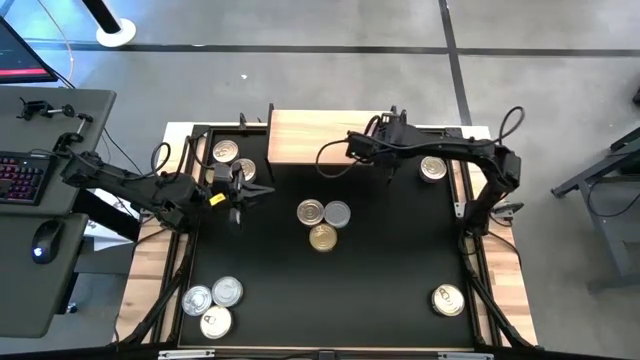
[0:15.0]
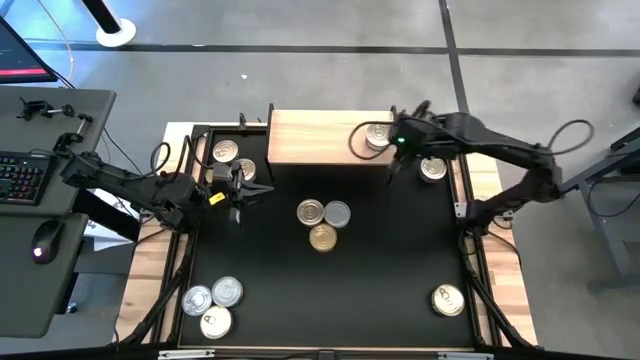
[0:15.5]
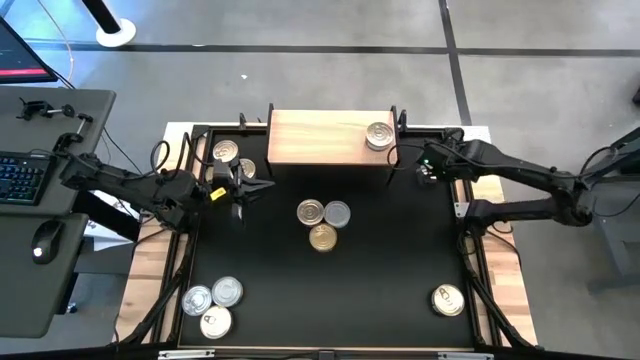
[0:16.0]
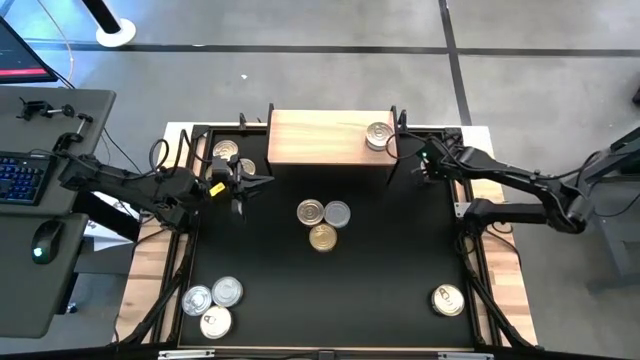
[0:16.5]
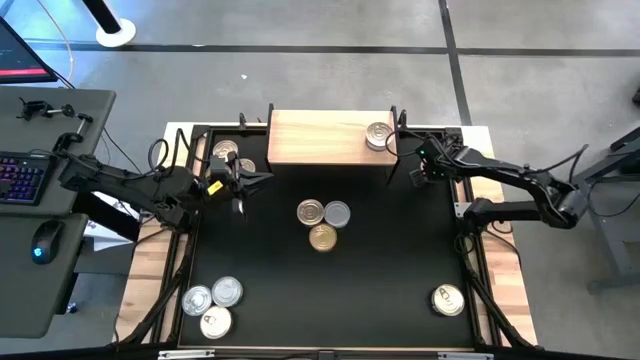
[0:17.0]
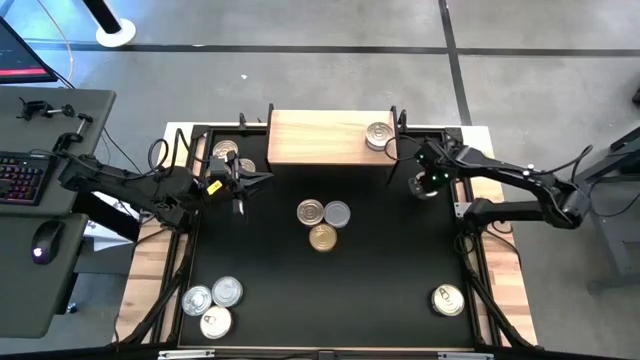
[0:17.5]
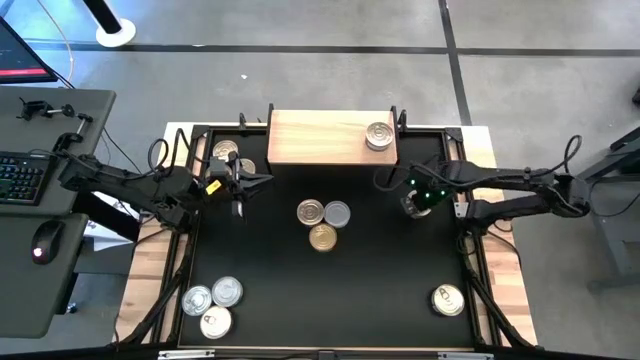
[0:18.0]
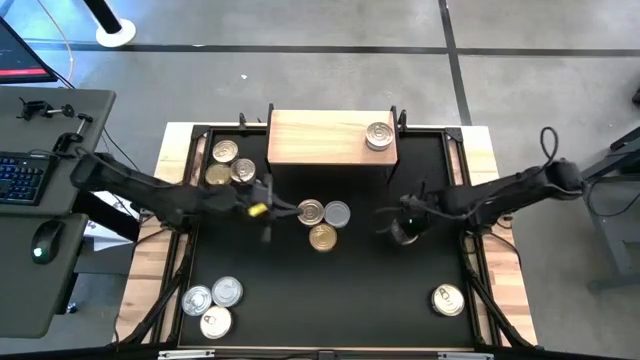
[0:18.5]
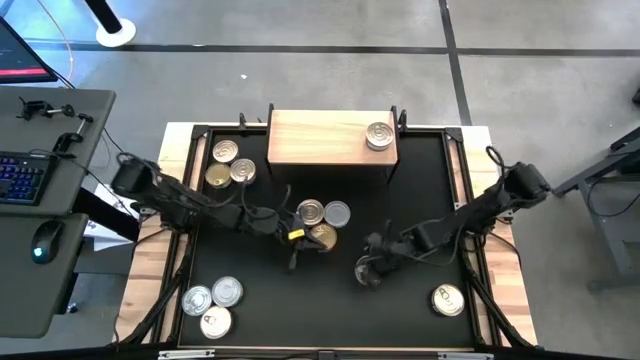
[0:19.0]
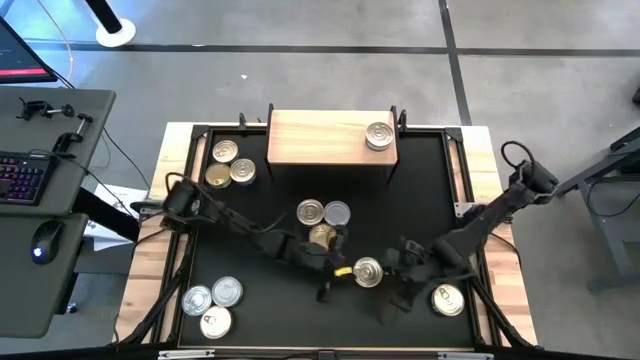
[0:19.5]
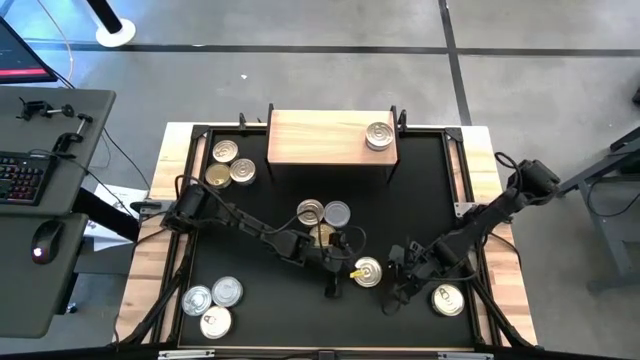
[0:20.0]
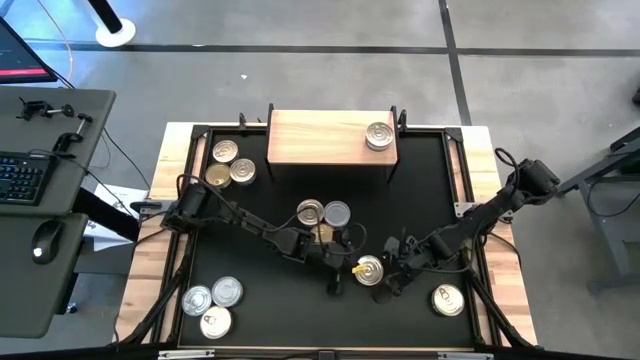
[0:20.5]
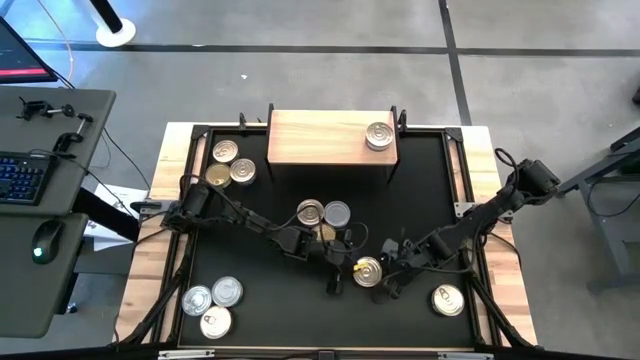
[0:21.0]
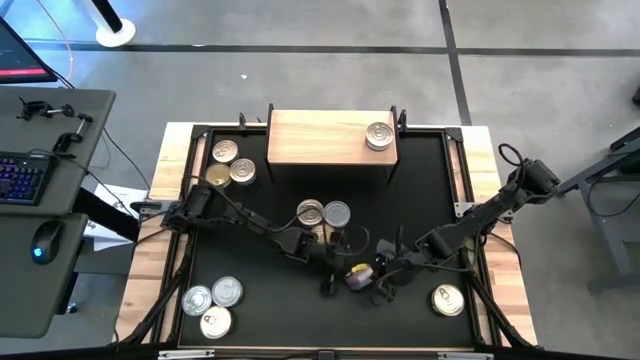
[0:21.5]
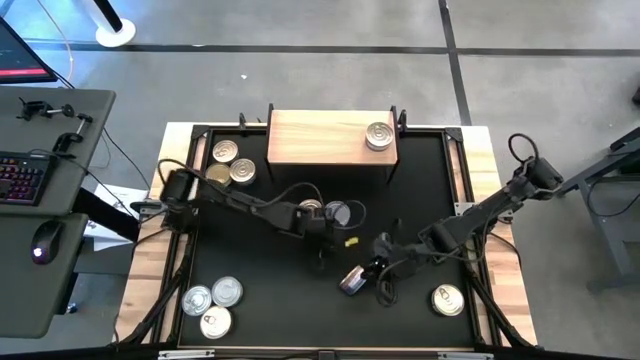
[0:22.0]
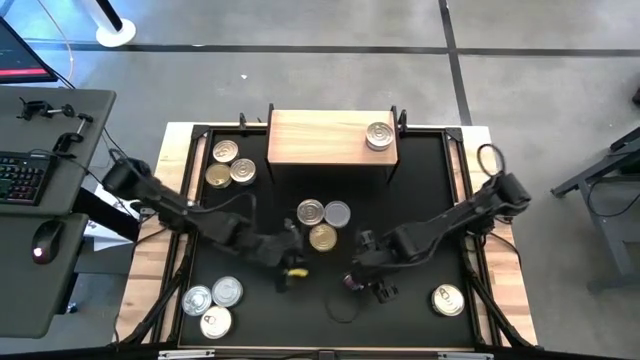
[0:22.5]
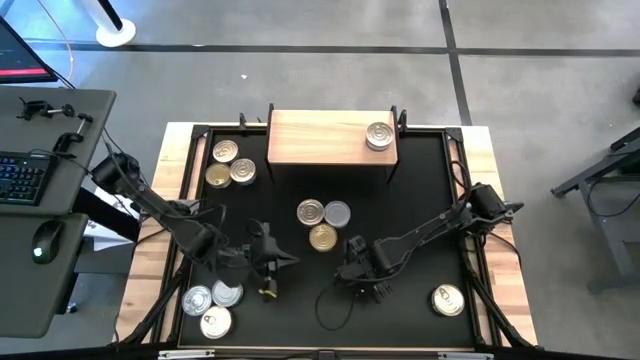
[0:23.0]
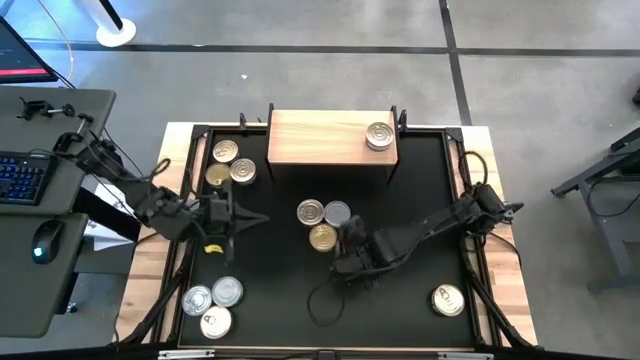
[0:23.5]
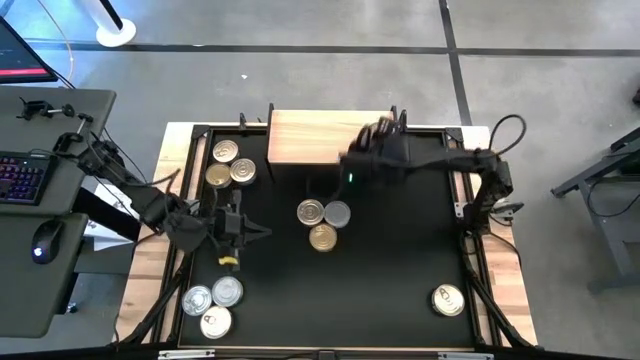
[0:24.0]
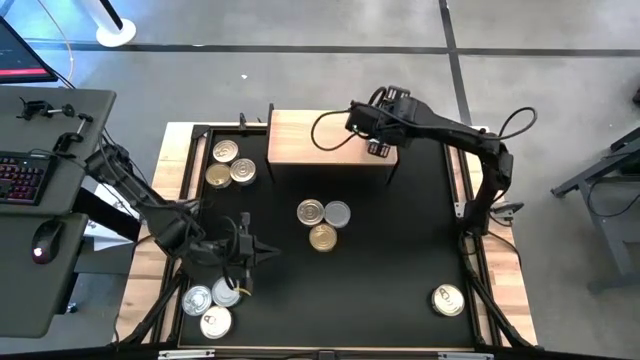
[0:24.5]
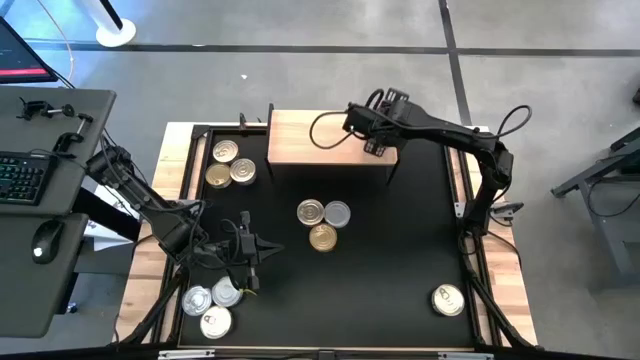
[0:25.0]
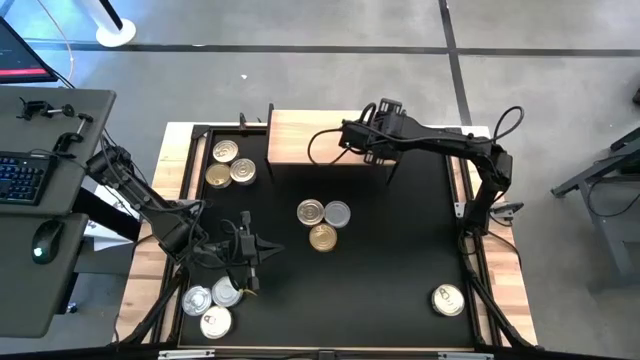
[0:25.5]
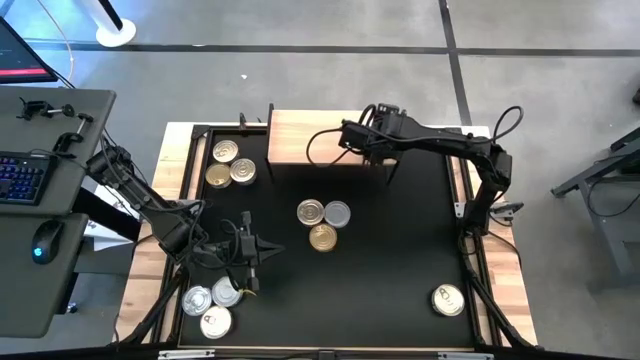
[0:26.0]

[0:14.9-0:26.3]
Task: Stack canned seafood by type on shelf
Stack the blue tuna can on top of the blue tuna can

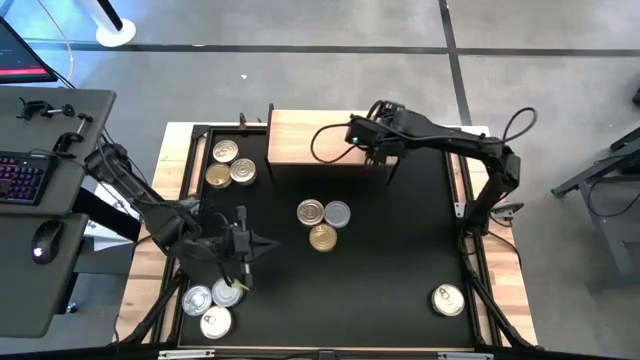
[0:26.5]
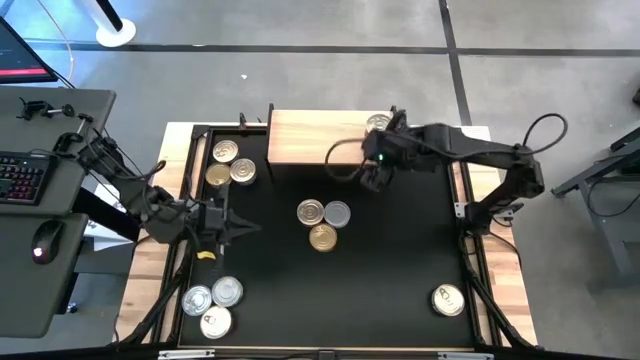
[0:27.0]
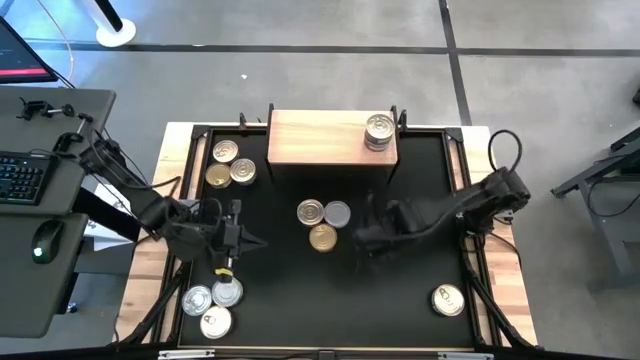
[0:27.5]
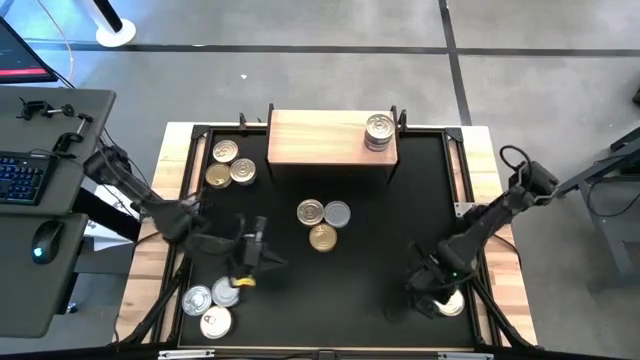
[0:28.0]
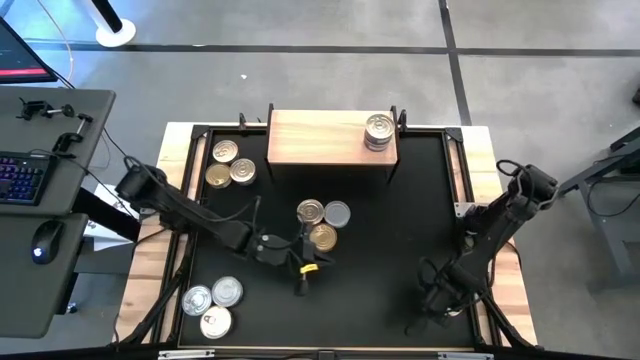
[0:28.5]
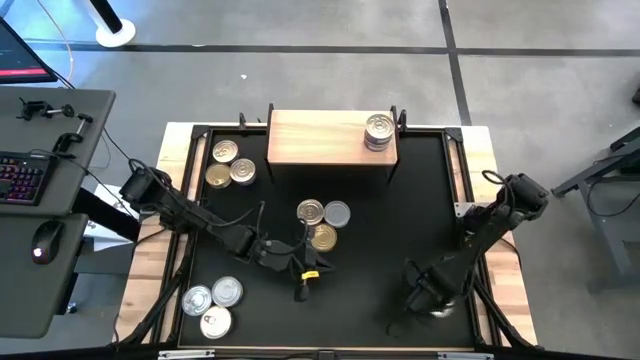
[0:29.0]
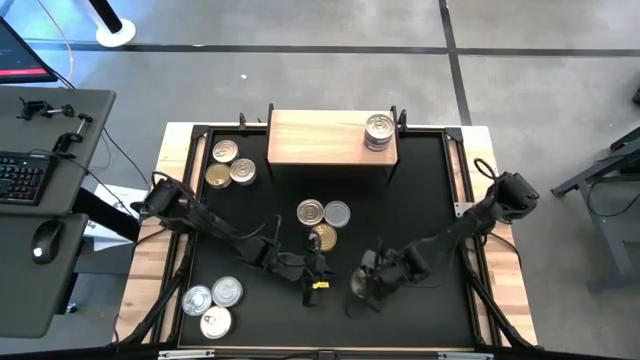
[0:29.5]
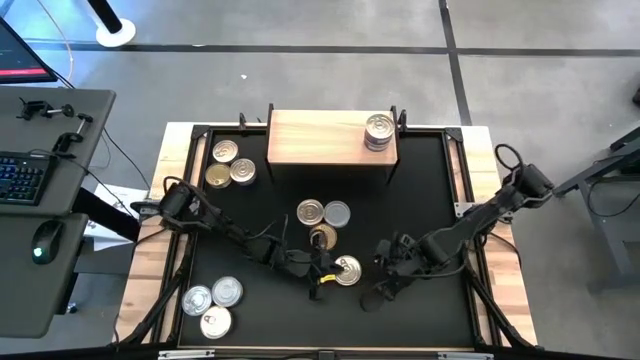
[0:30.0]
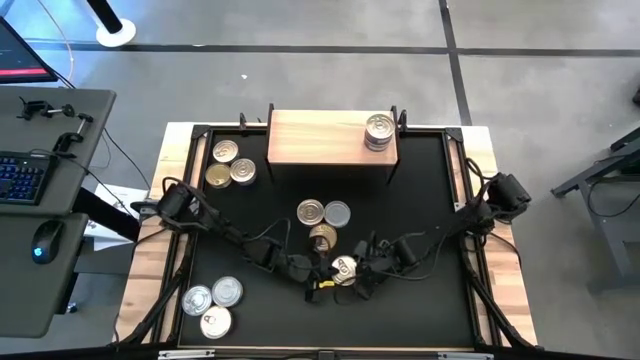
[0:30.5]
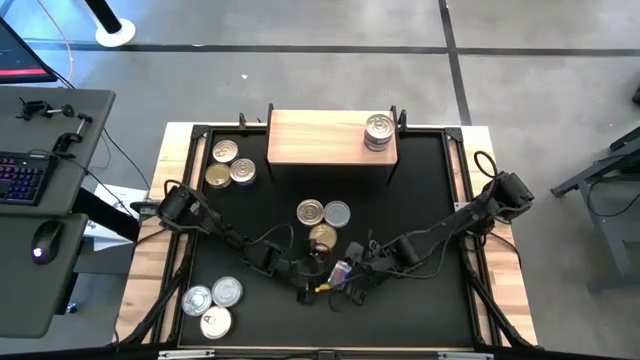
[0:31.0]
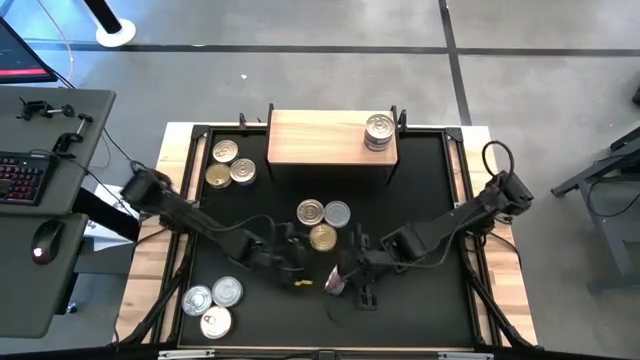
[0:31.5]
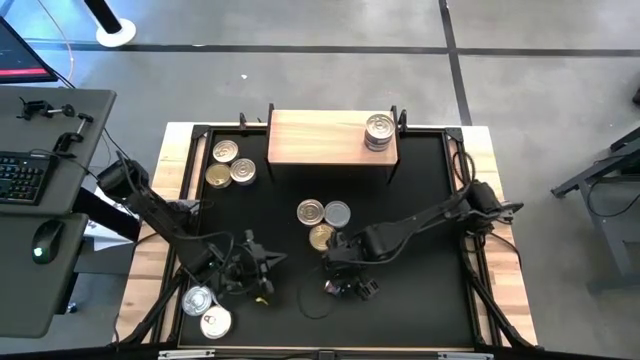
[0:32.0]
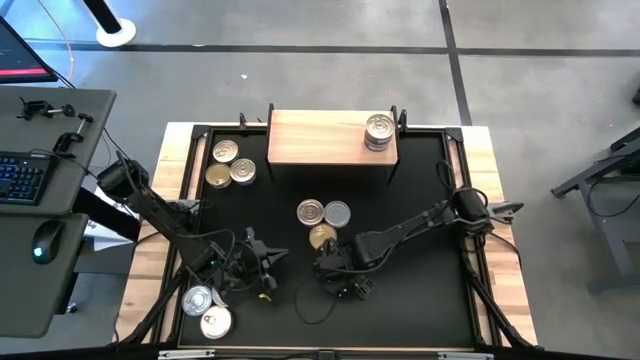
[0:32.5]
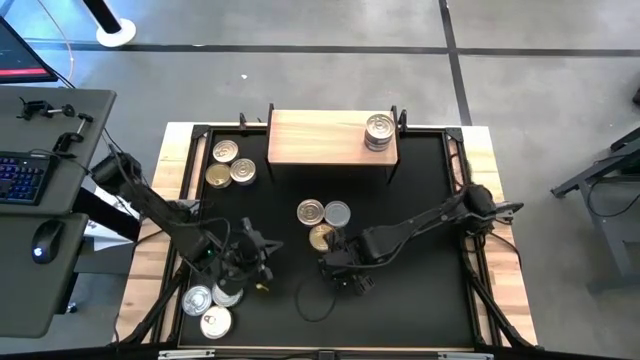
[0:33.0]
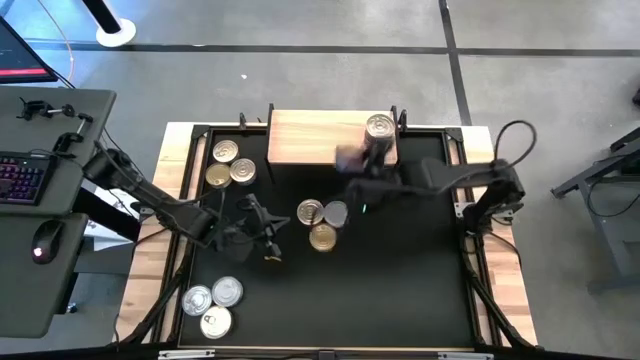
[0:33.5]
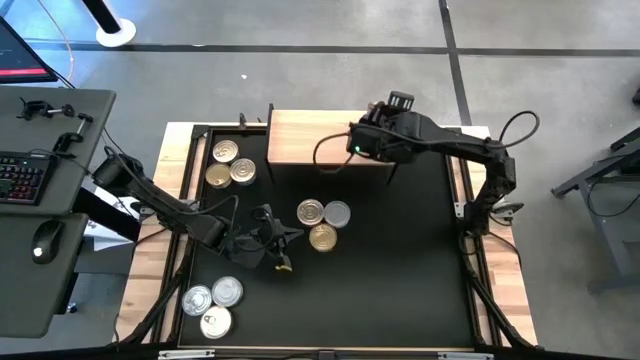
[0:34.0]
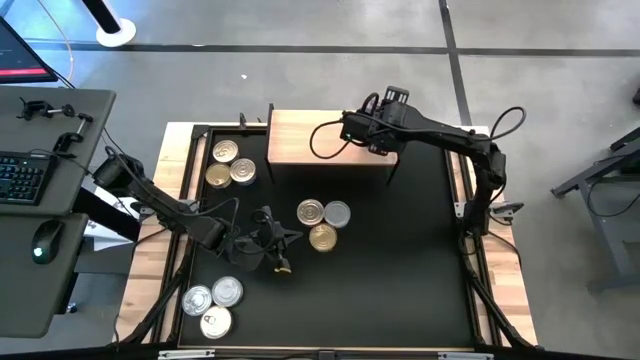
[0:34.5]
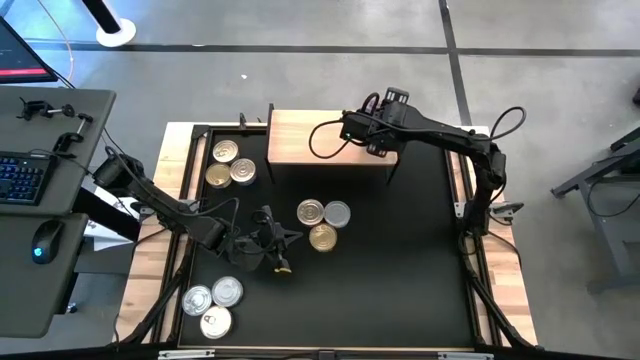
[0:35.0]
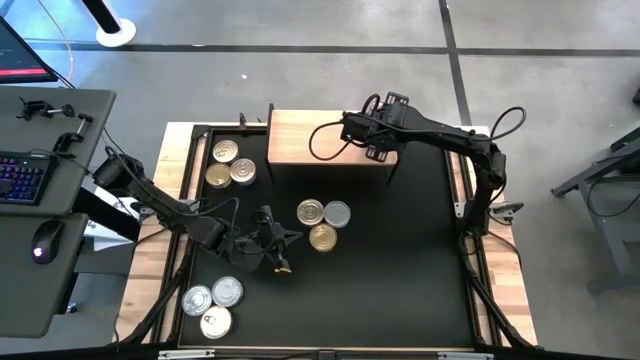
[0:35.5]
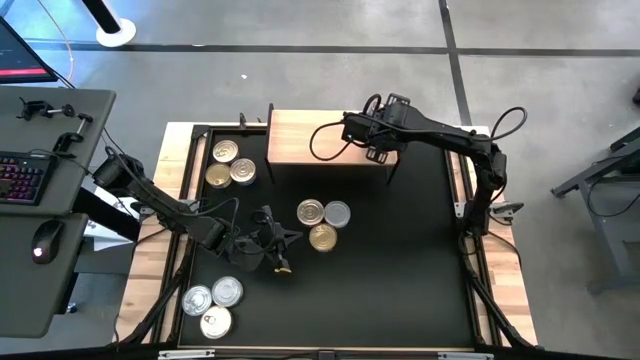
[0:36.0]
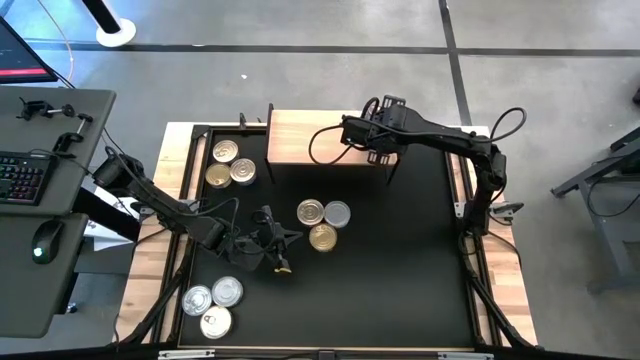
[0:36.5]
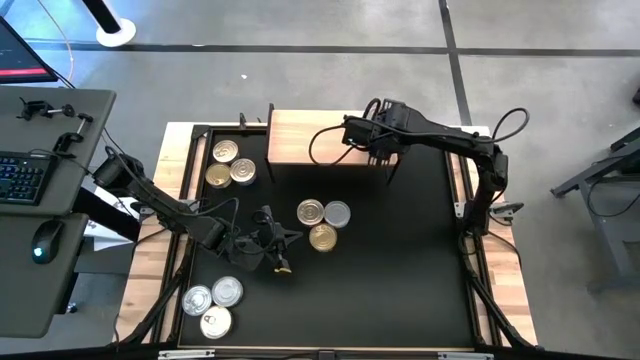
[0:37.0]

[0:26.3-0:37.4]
Stack the blue tuna can on top of the blue tuna can
